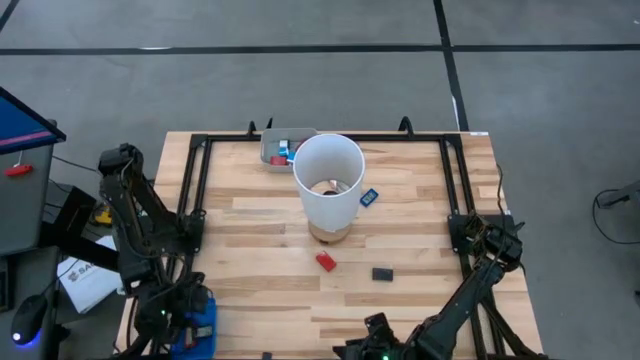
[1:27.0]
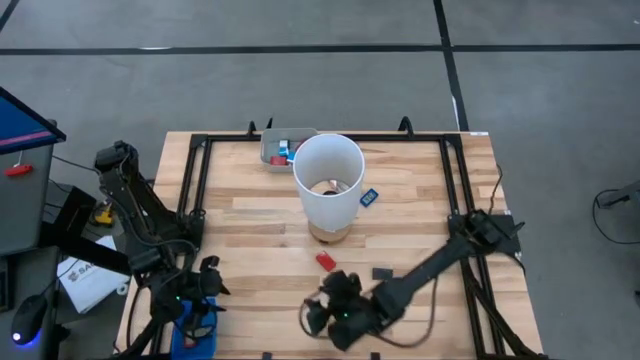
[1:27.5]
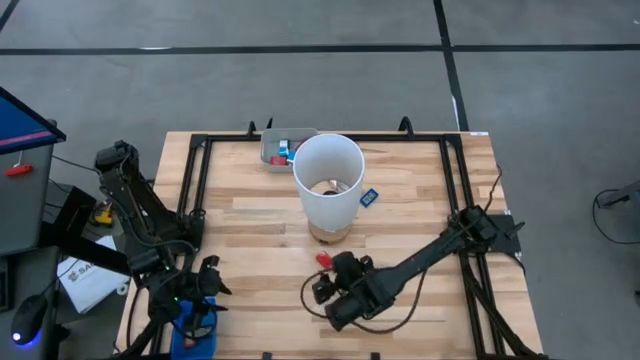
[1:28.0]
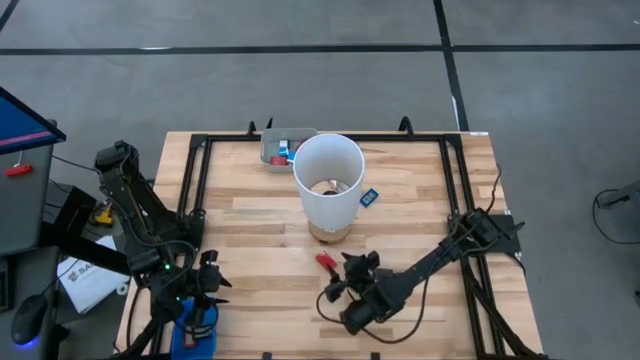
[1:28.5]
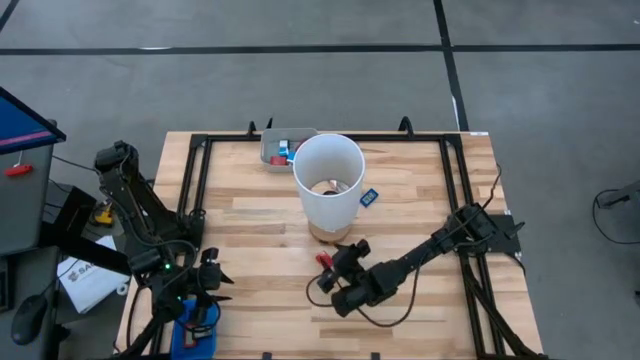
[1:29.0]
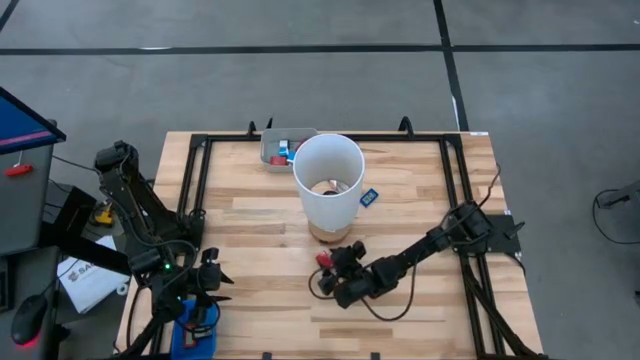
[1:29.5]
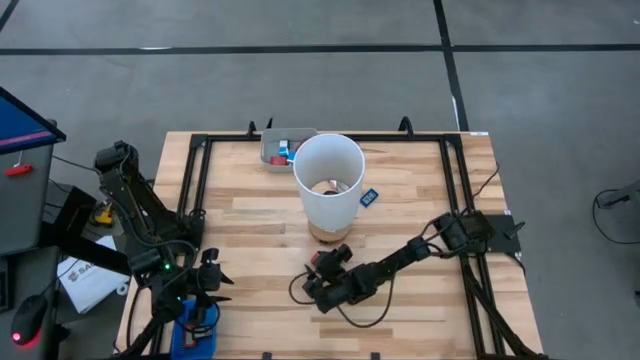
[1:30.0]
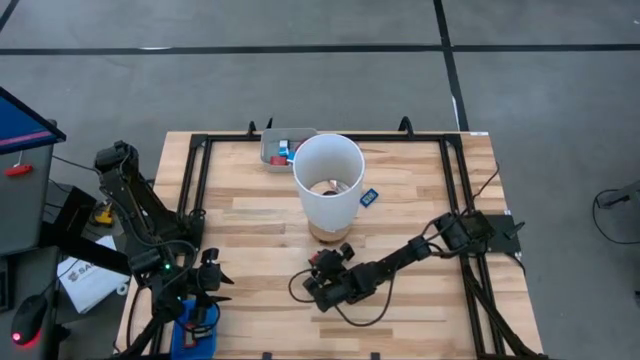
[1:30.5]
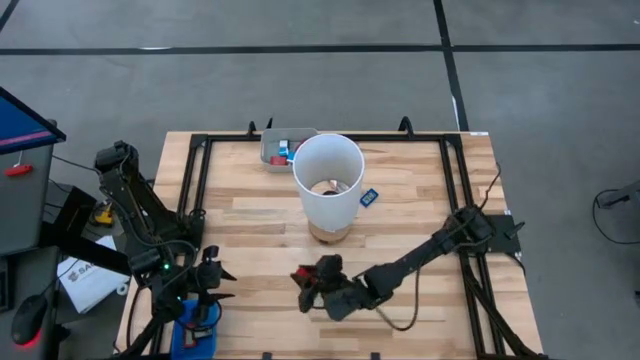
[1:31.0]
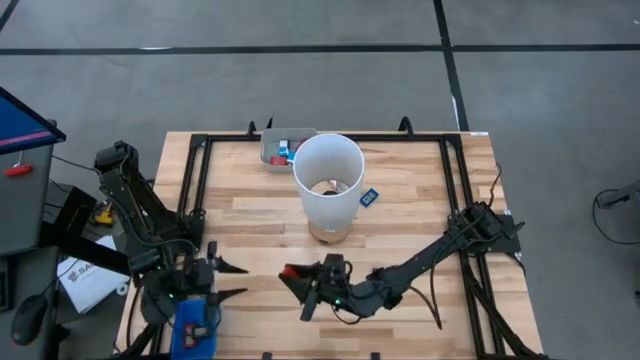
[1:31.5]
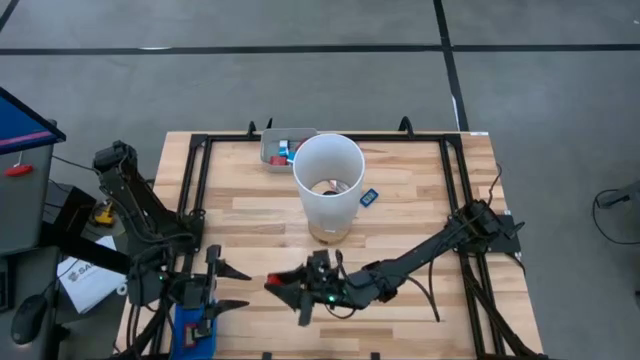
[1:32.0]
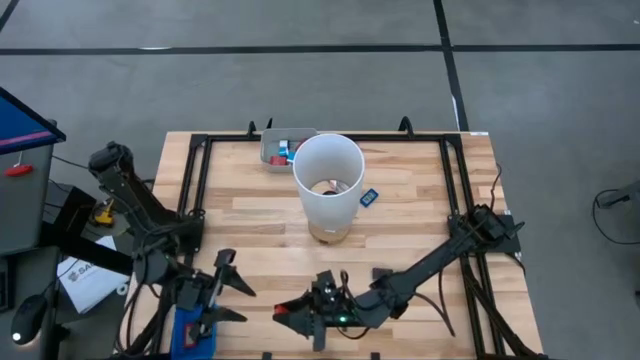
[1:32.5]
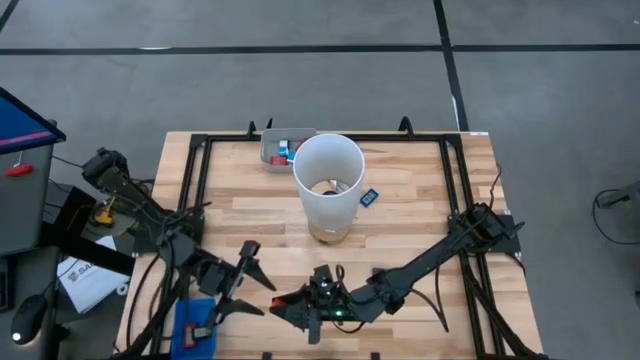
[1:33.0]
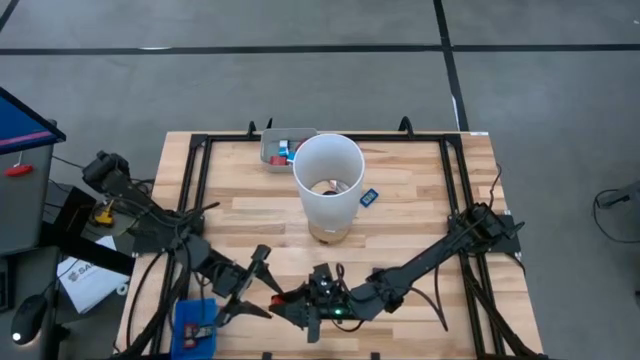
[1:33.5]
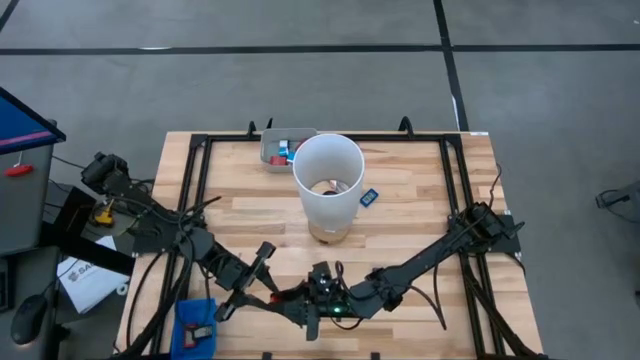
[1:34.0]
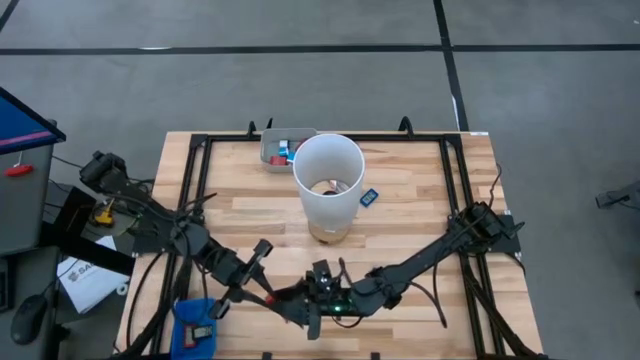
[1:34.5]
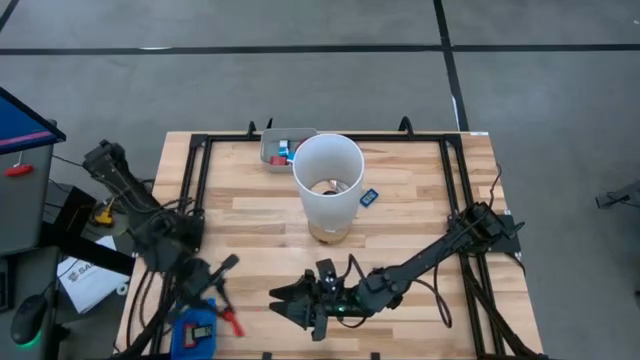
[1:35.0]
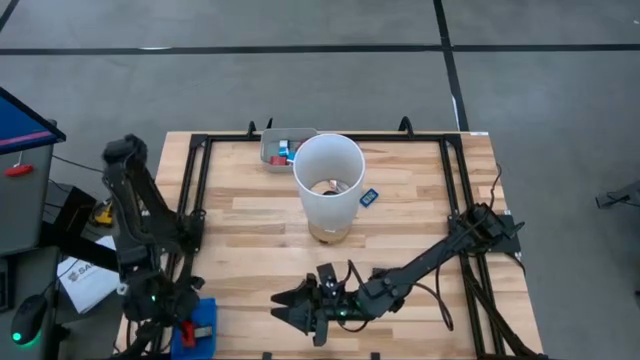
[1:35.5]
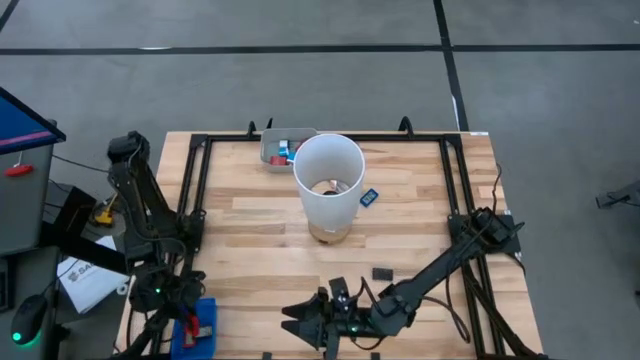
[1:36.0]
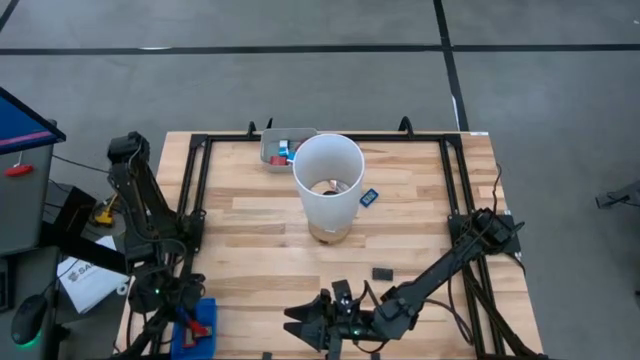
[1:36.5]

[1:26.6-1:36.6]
Task: Pick & Place Office items
Put the red digital timer into the blue bin

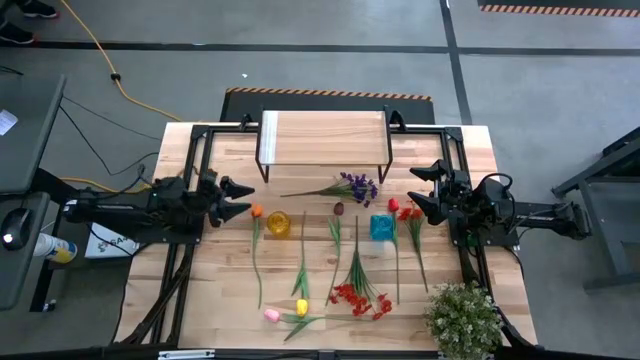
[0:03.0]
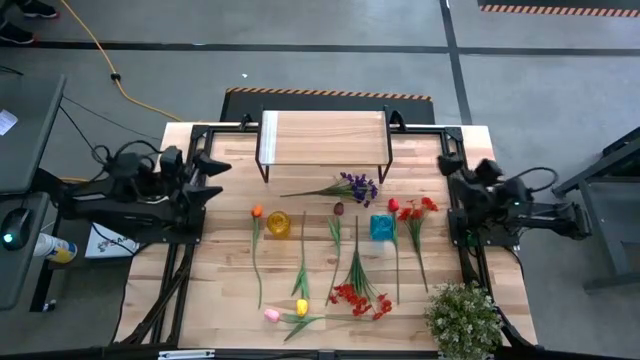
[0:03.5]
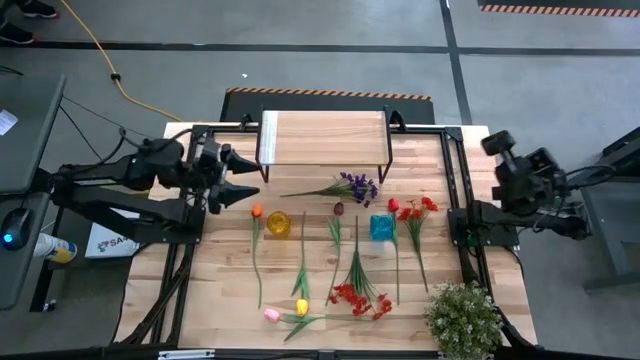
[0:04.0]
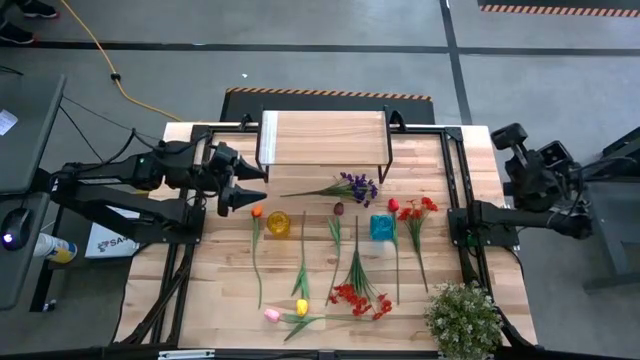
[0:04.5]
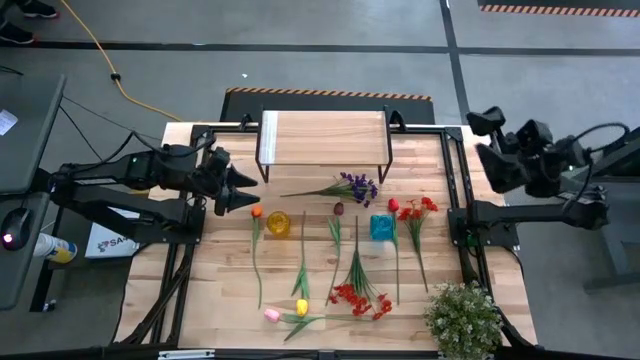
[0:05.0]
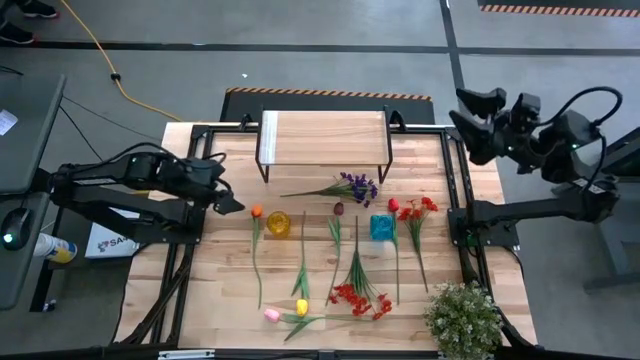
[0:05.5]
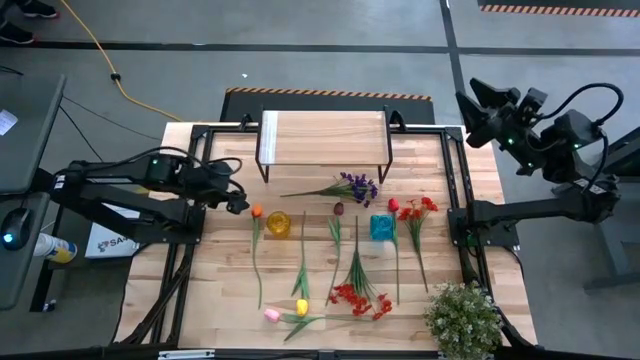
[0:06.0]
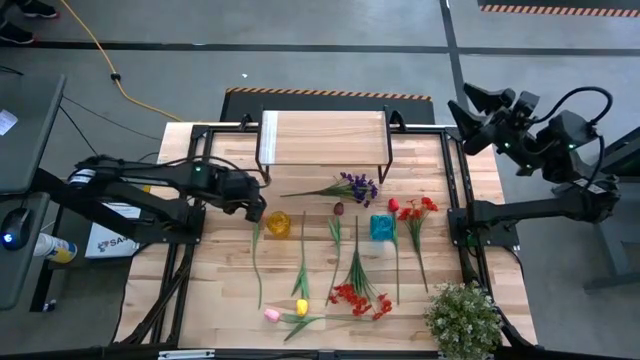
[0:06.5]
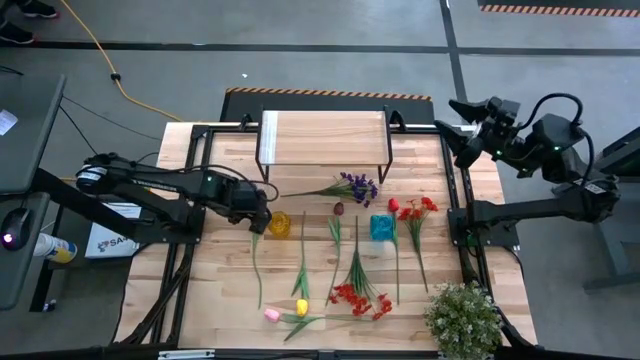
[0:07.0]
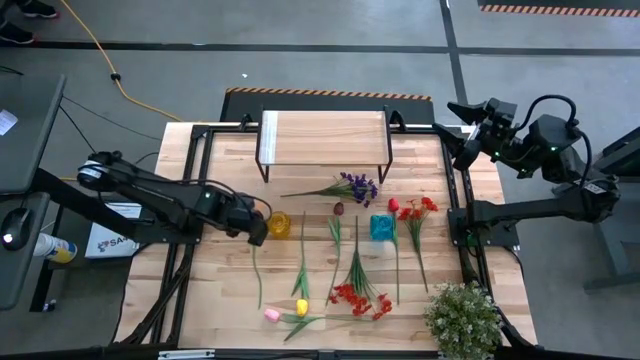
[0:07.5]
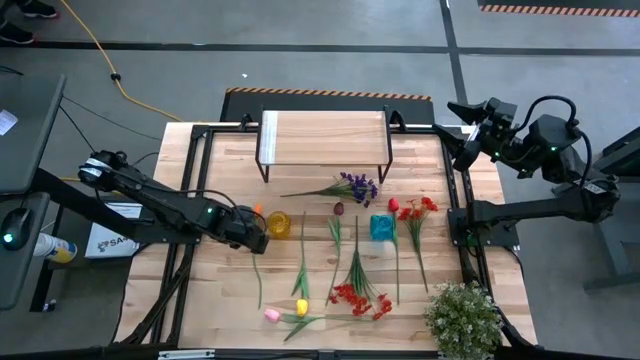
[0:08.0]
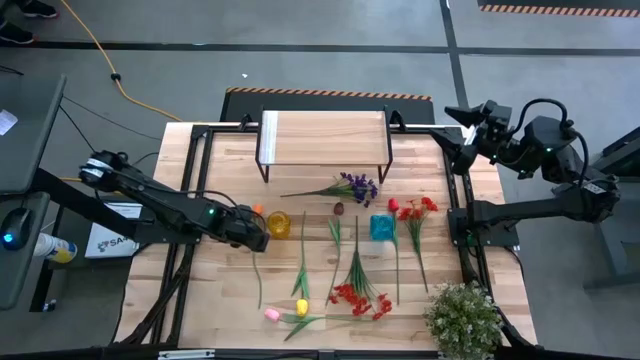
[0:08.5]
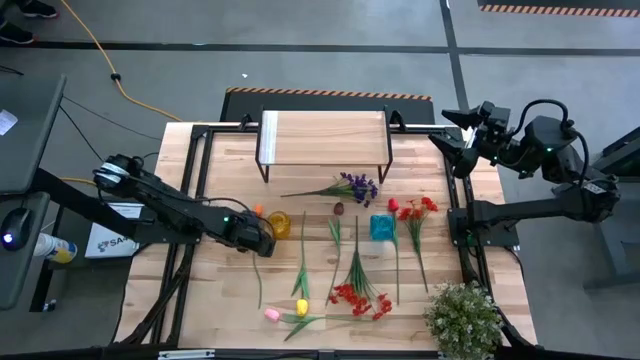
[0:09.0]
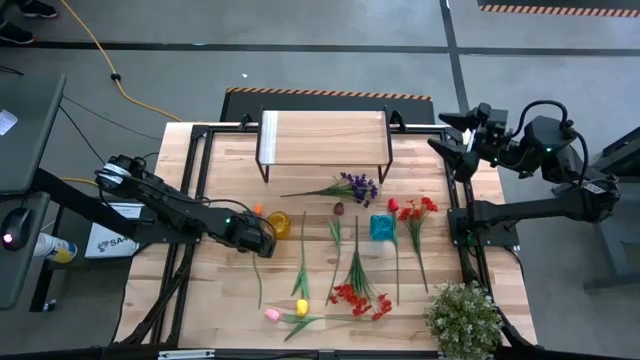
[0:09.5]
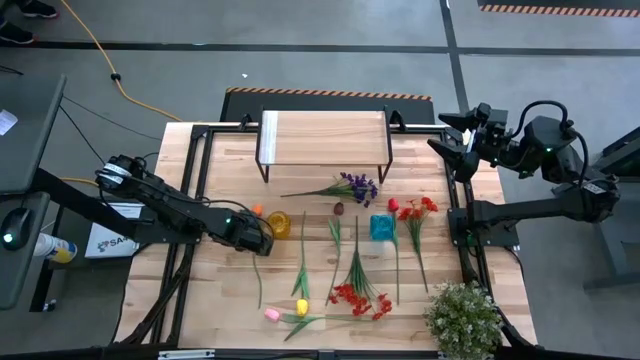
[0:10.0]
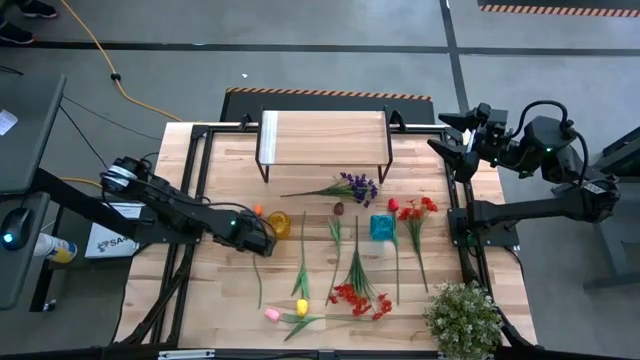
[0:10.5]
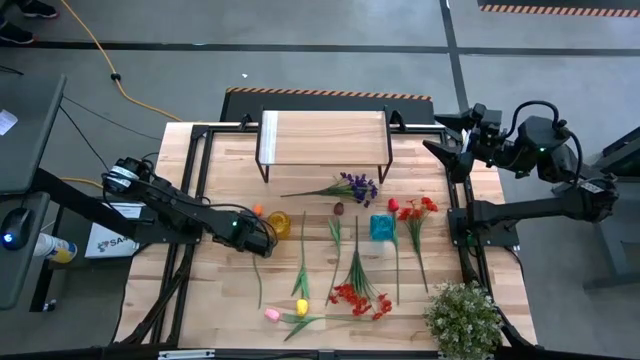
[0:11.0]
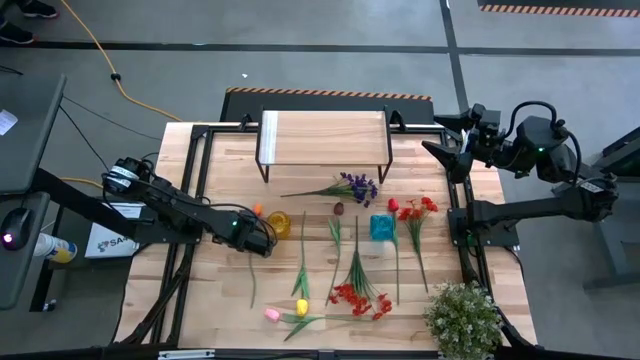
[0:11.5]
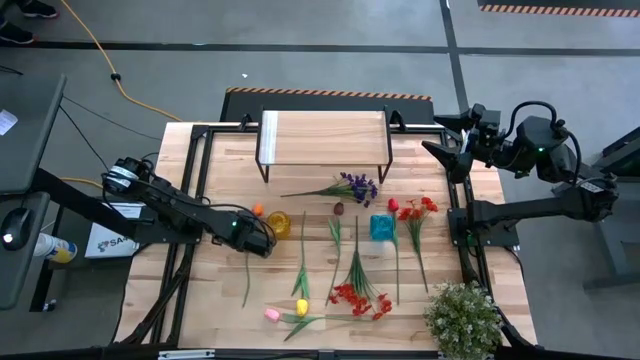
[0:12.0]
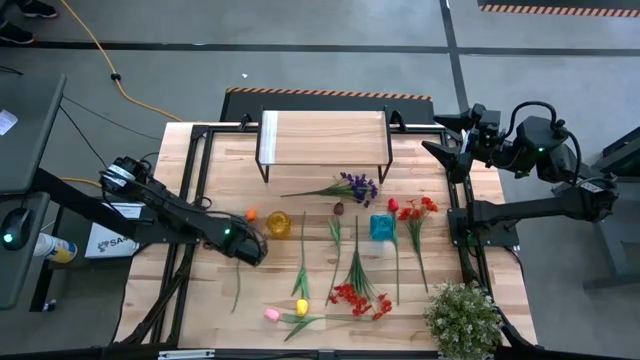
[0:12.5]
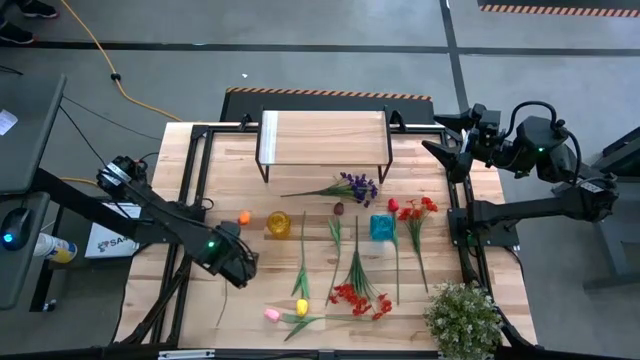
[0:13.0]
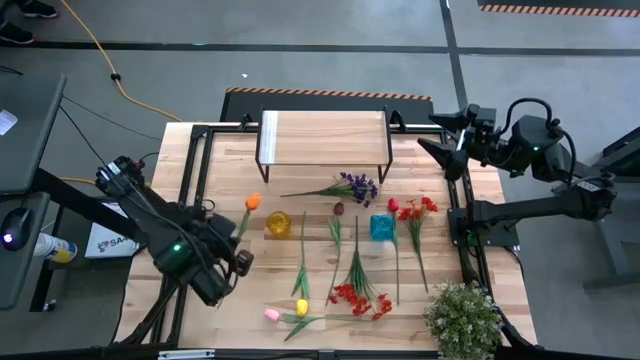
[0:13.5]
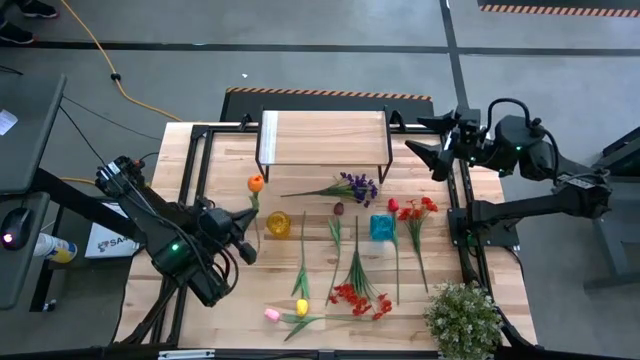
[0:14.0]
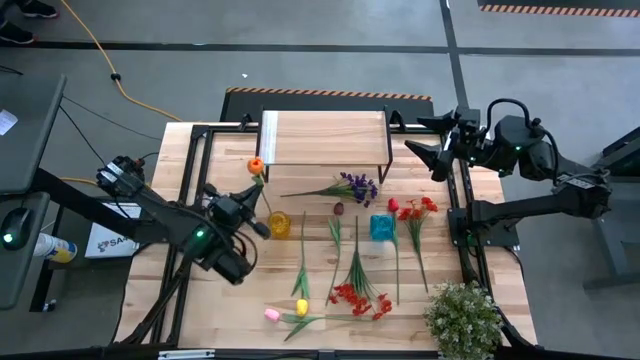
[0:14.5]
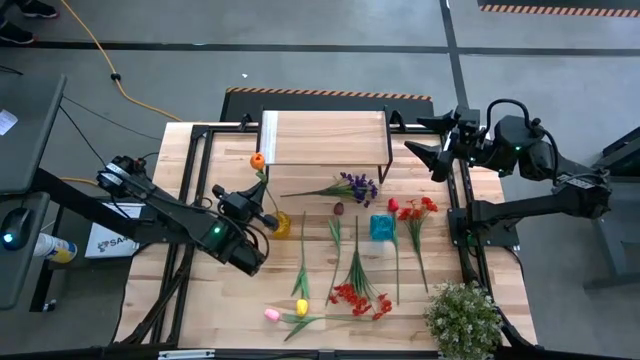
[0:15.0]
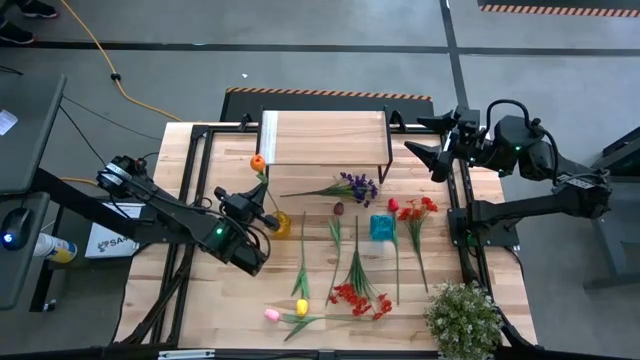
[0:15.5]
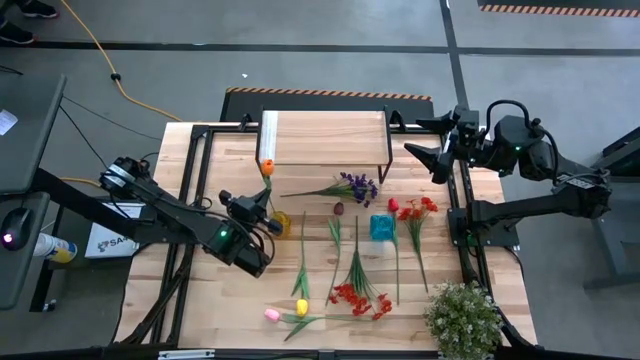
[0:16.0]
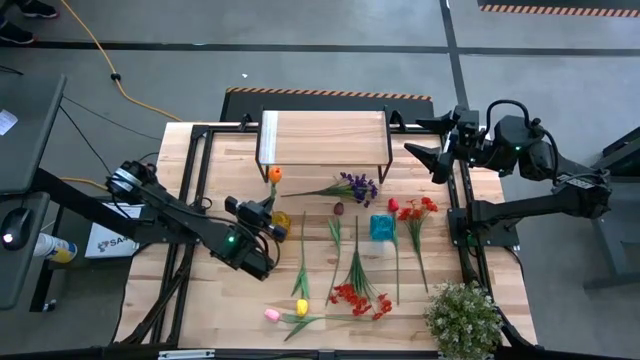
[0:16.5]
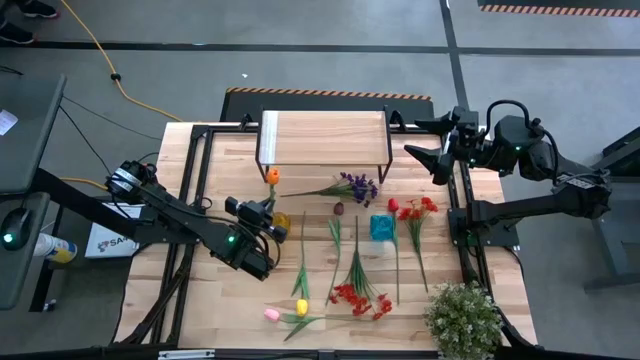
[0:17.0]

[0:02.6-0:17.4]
Task: Pick and place flowers into a vace then onto a shelf
Put the orange tulip into the yellow vase
